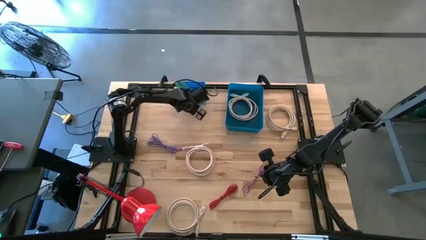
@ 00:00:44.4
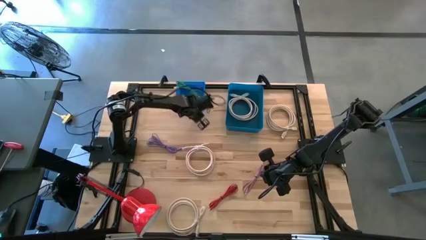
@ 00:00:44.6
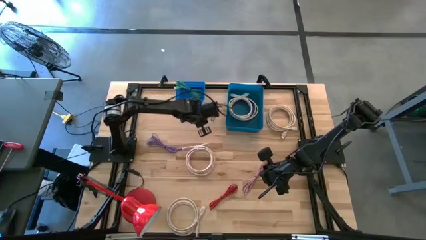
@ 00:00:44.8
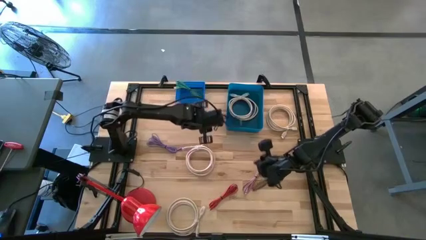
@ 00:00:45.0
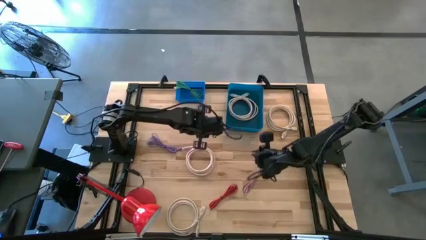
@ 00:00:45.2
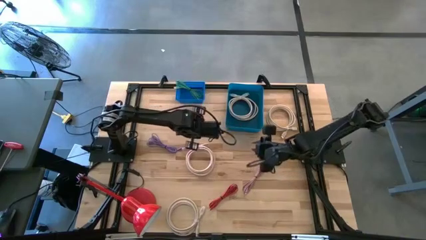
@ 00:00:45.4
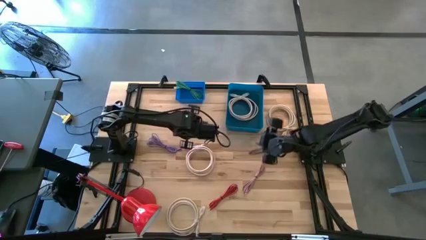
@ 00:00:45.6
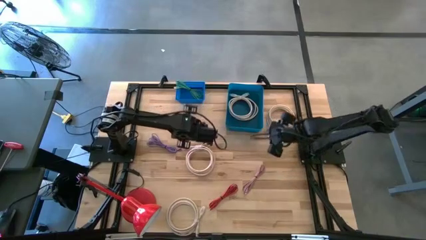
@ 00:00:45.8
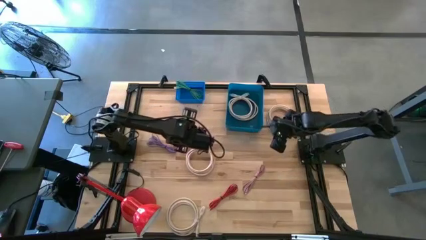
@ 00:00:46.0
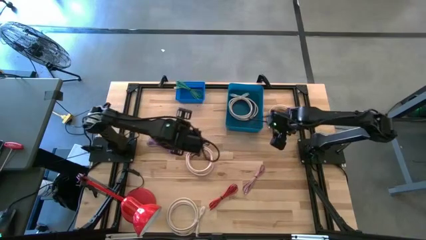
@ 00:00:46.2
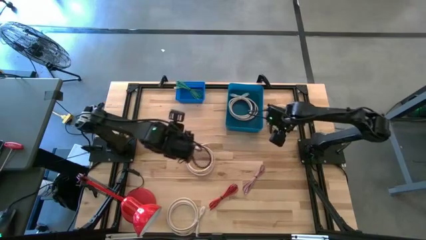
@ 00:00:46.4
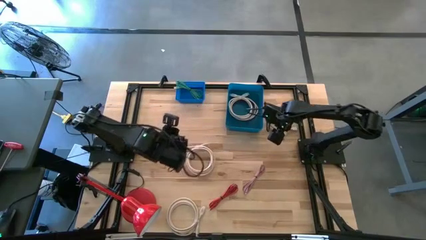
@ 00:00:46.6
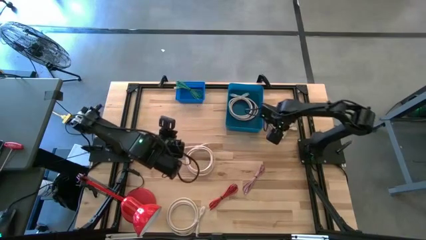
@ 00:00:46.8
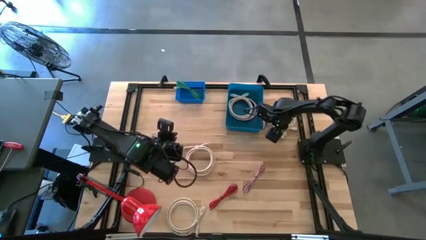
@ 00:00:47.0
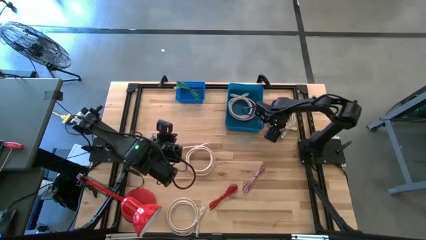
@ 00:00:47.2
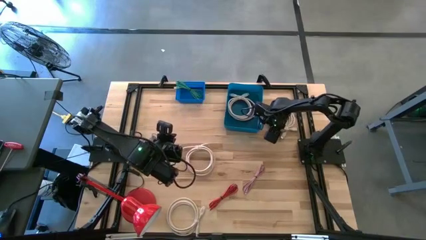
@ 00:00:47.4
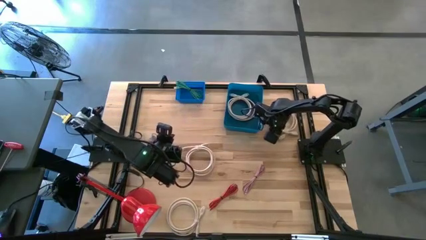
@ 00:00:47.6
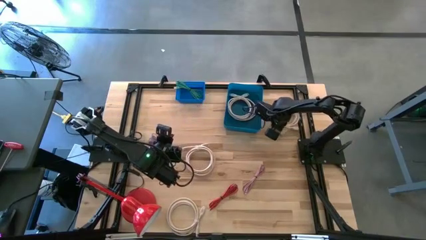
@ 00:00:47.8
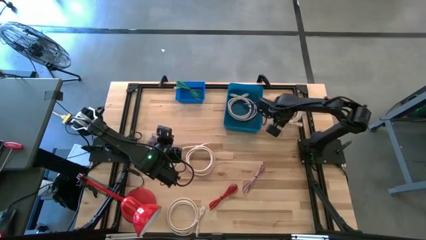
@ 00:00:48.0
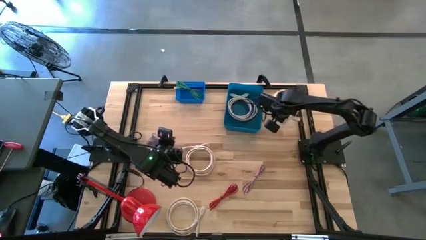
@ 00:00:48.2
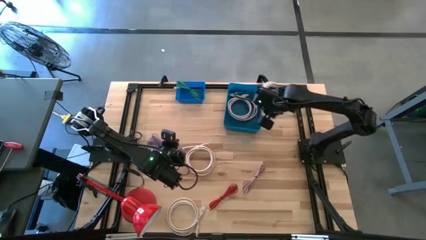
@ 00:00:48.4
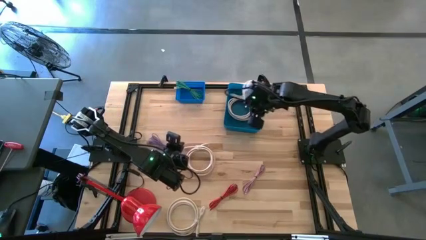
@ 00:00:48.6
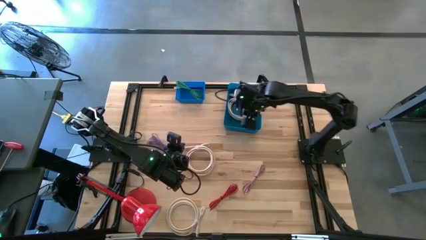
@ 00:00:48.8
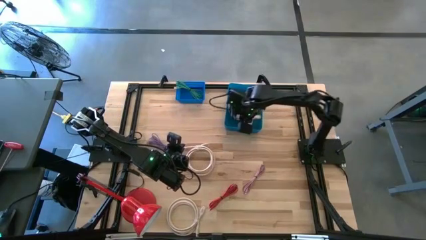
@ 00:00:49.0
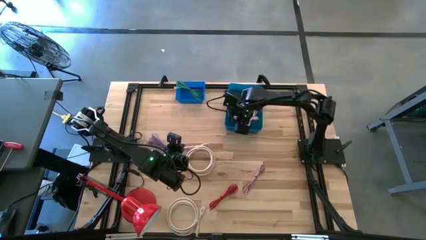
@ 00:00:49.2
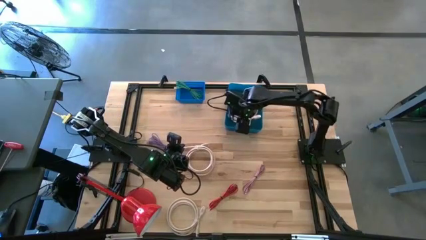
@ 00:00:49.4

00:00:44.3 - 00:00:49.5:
Task: Pick & Place USB Port
Put the white HDMI cable into the dark blue bin

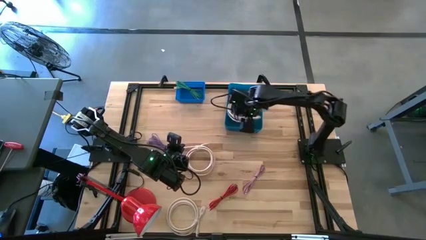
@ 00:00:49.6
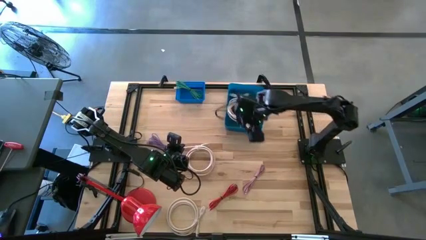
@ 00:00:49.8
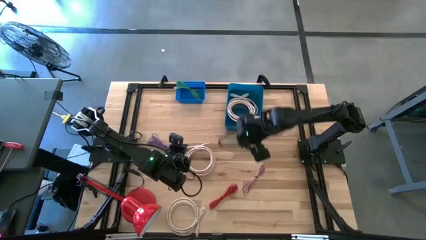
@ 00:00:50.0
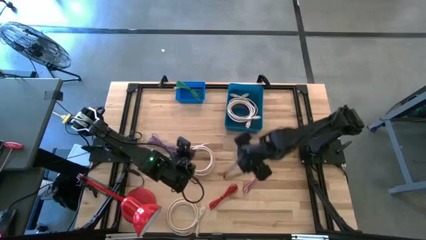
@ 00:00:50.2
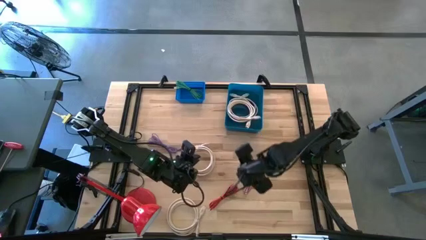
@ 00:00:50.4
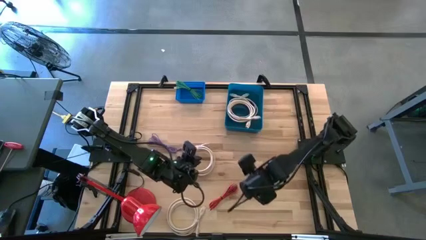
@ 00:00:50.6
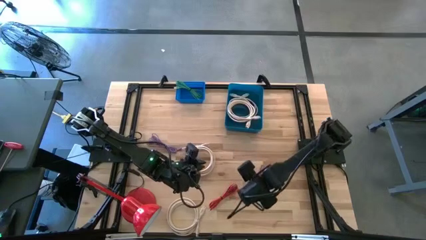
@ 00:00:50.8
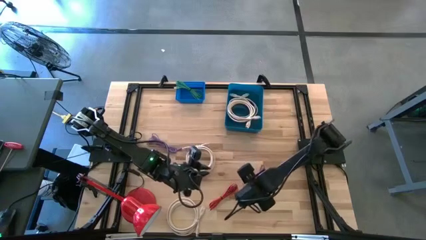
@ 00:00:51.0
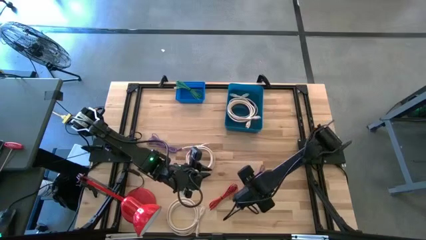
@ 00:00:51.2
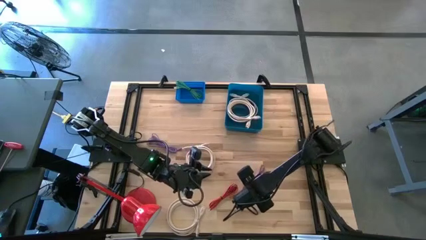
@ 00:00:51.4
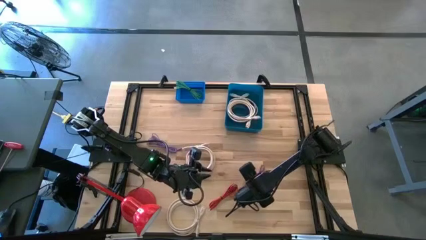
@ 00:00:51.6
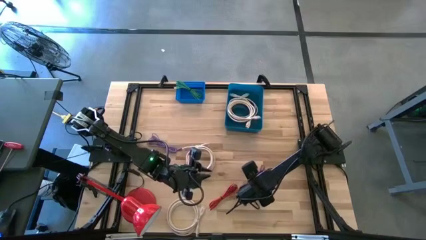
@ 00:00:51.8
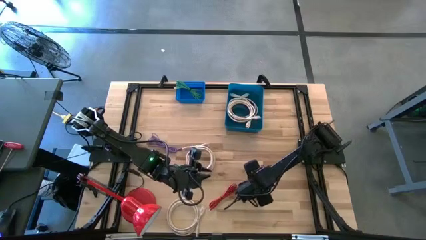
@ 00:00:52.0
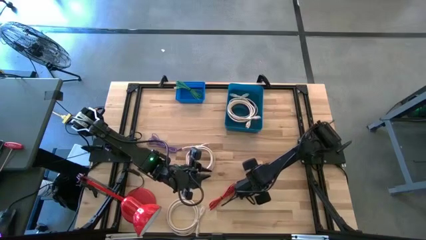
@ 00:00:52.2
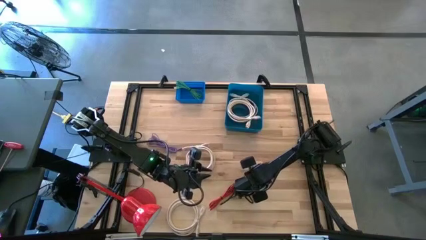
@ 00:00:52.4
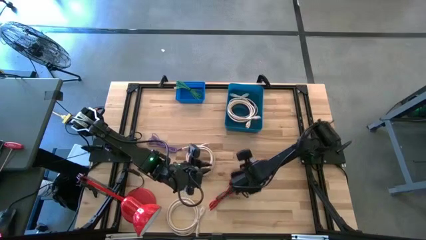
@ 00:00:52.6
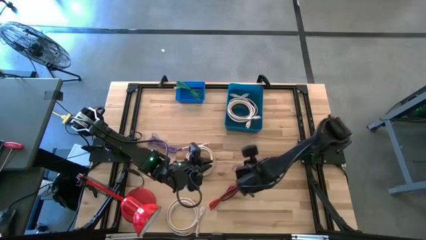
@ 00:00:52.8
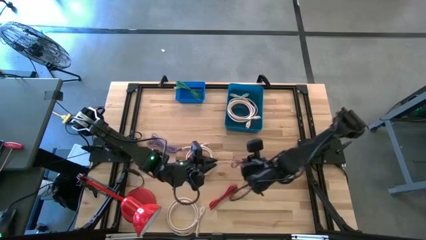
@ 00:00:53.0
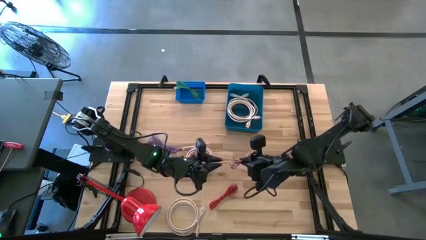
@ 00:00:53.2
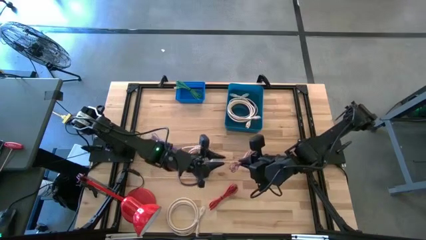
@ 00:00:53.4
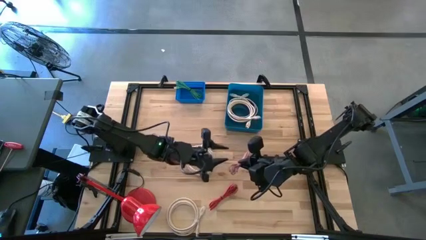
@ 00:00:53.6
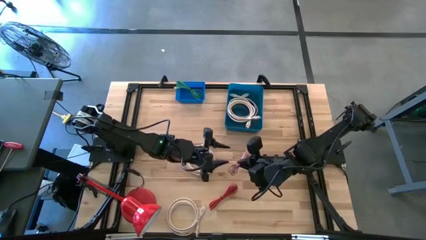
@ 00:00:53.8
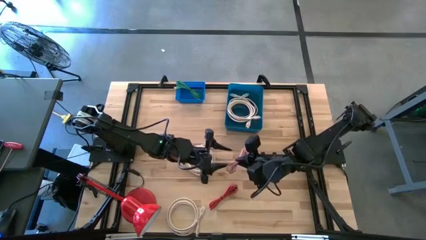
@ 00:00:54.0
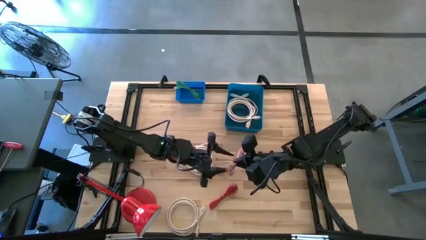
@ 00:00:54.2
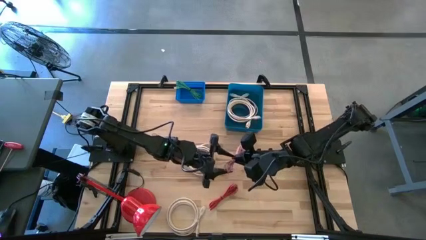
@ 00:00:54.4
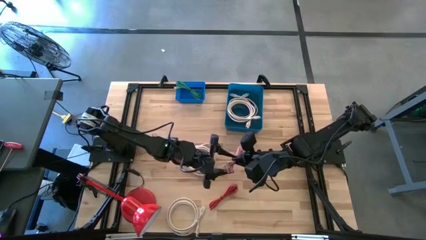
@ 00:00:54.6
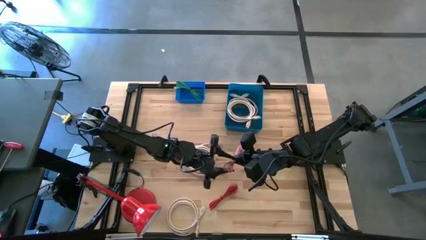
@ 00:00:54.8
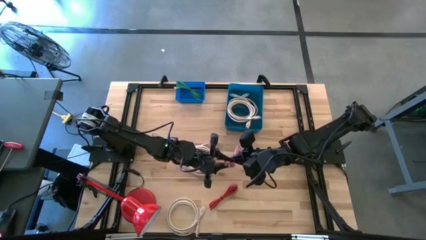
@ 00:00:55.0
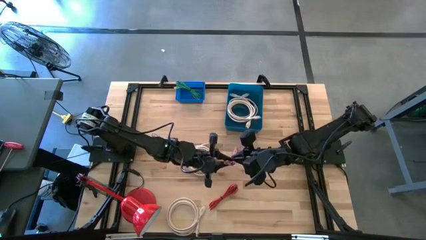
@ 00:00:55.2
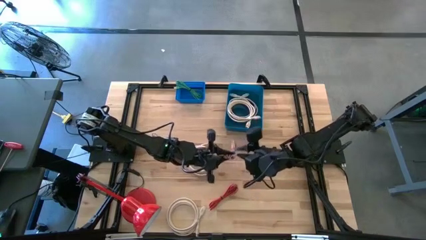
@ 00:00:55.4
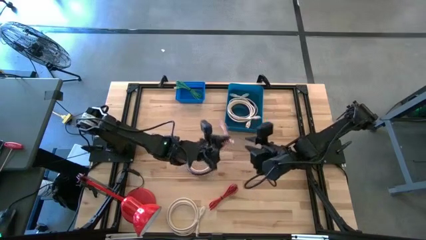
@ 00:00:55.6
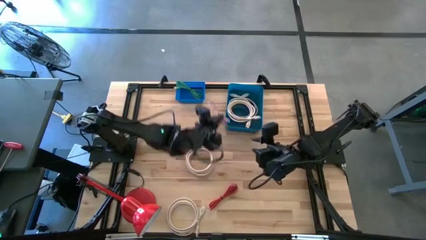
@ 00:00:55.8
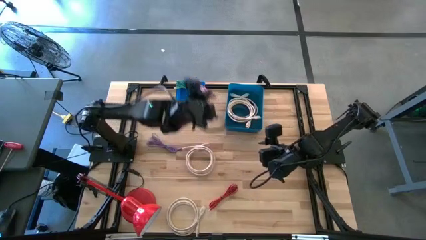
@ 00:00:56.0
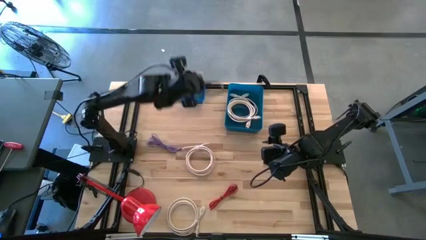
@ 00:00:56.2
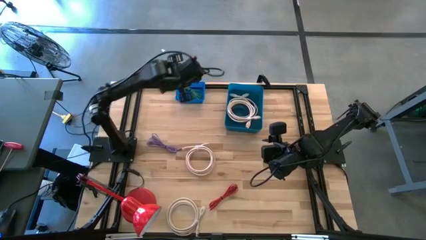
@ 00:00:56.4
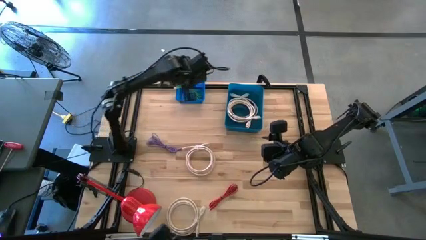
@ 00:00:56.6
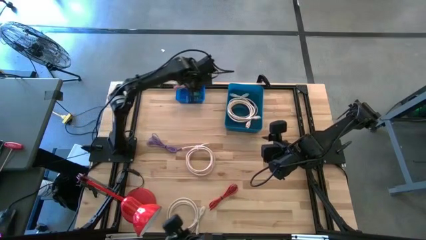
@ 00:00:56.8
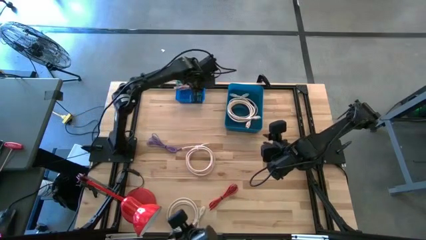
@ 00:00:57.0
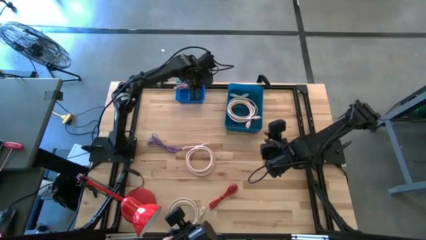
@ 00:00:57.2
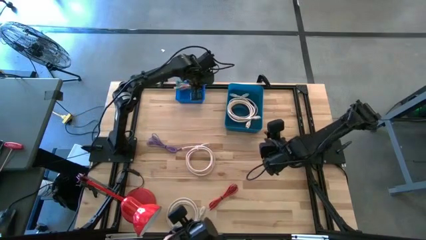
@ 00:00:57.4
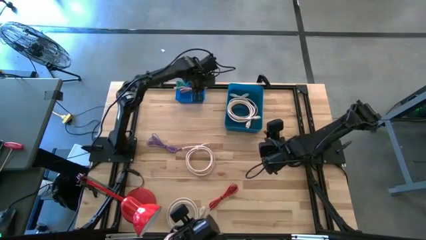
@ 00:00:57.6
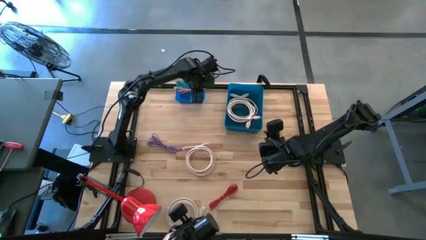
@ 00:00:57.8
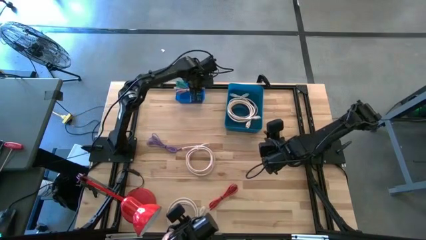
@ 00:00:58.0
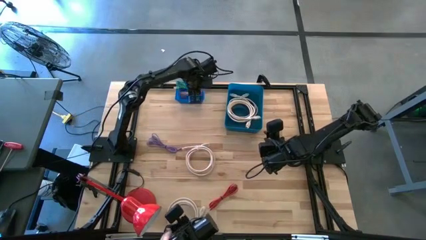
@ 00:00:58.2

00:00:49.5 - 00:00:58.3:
Put the pink charger cable into the blue bin

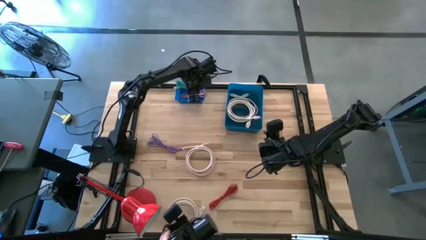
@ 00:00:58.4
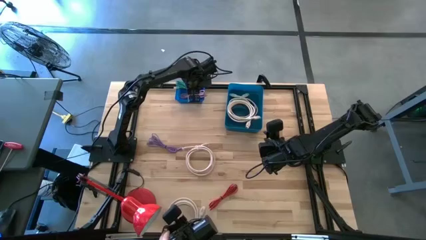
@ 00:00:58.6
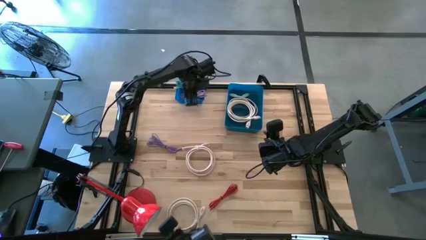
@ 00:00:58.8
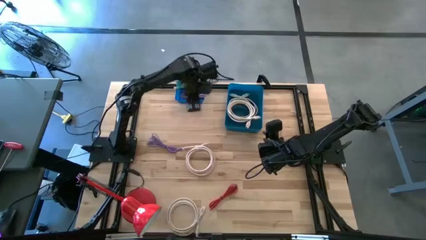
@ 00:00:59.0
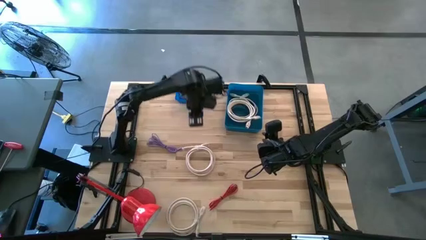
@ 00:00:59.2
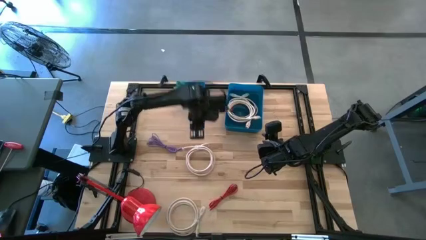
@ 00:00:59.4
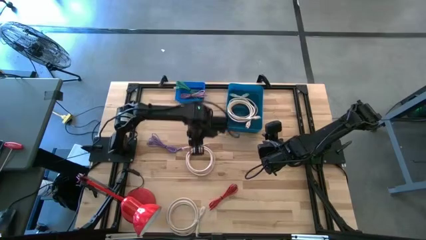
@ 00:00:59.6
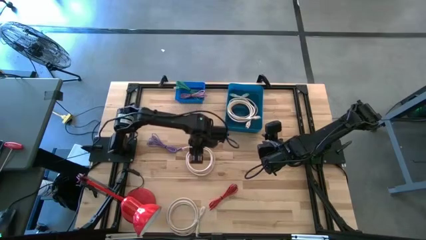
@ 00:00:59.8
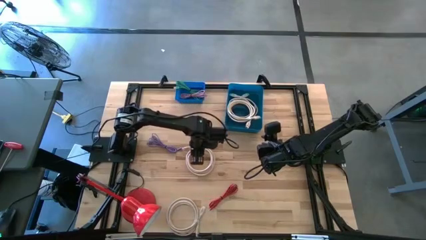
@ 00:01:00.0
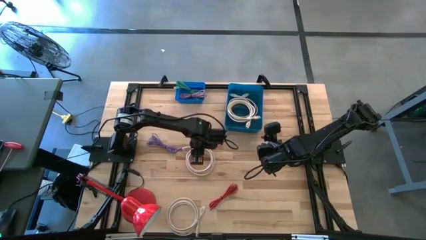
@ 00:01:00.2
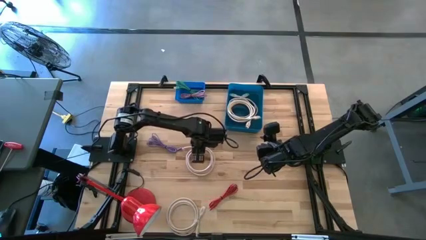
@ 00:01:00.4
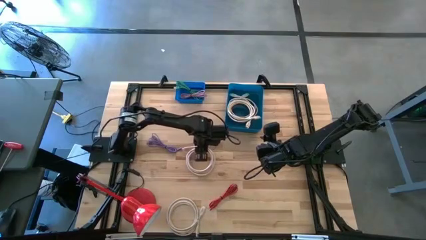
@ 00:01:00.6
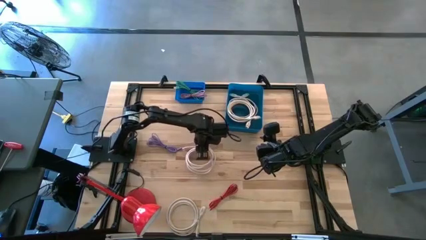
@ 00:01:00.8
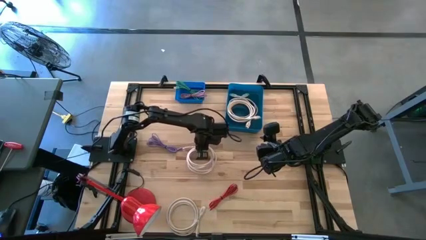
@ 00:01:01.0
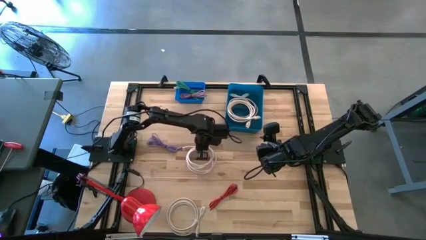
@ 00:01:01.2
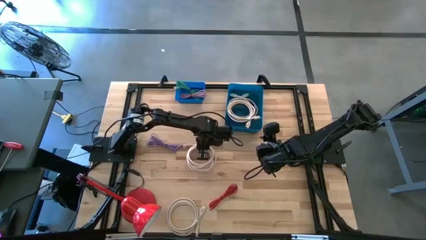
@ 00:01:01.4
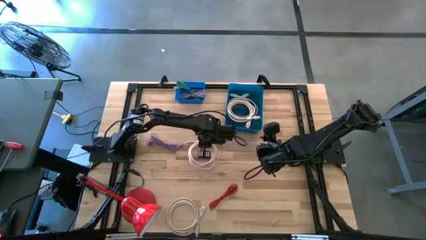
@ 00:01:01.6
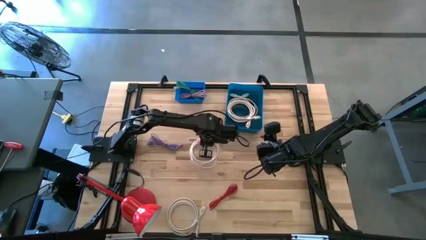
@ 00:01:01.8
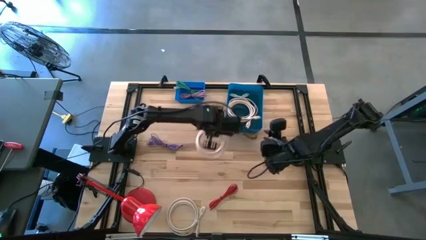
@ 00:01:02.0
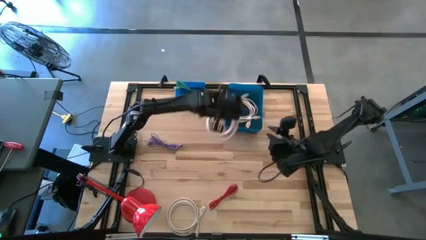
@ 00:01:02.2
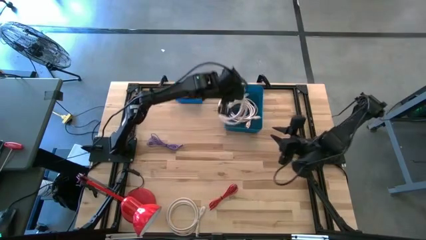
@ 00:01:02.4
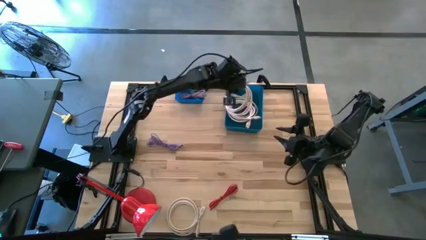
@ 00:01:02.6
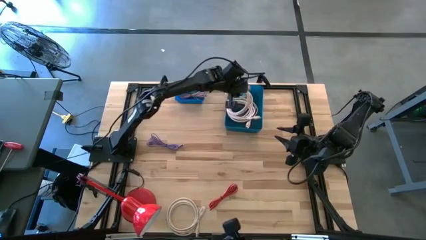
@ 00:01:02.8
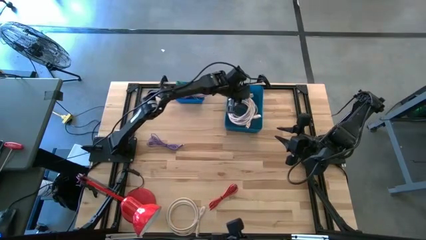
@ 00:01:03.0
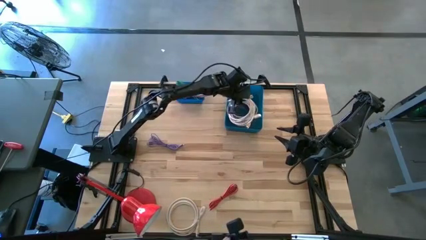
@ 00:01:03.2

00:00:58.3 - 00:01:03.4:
Put the white HDMI cable into the dark blue bin
